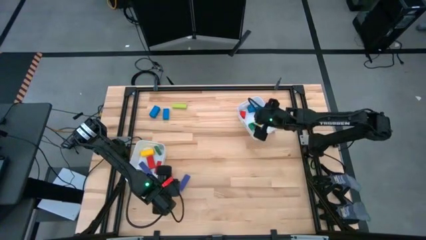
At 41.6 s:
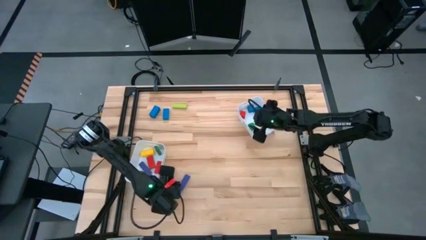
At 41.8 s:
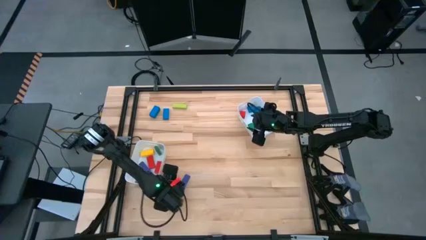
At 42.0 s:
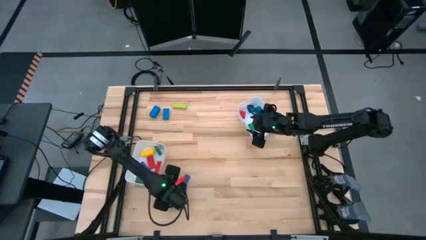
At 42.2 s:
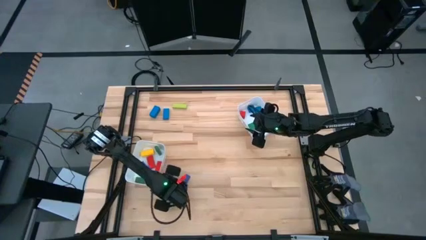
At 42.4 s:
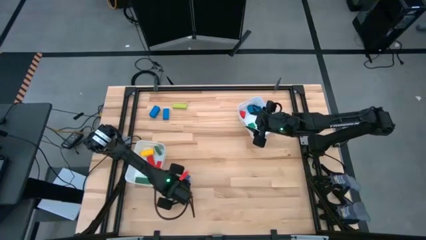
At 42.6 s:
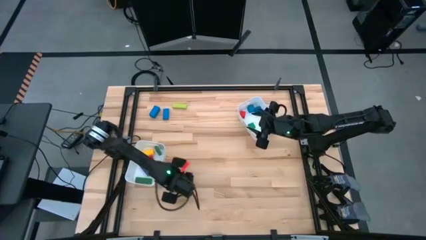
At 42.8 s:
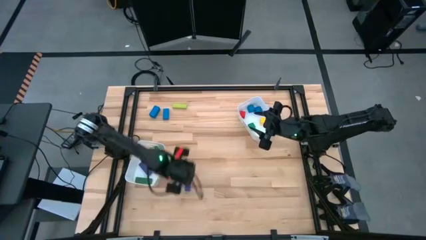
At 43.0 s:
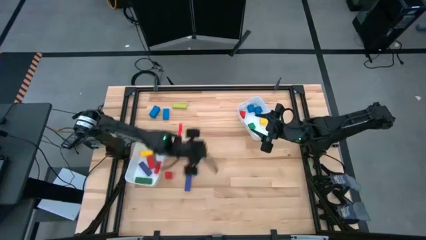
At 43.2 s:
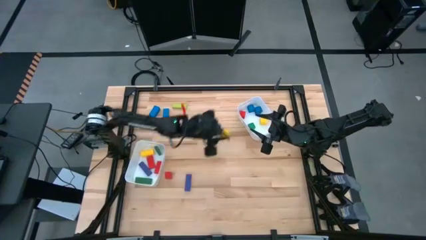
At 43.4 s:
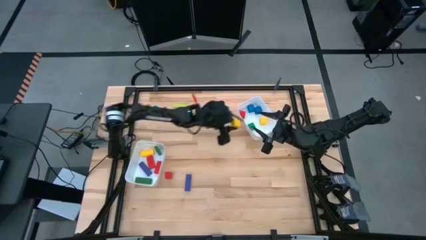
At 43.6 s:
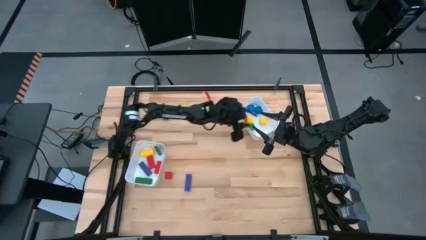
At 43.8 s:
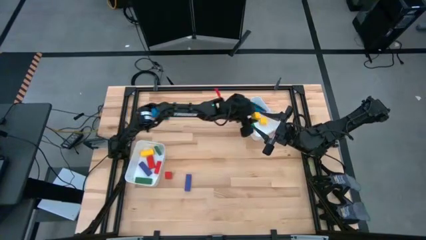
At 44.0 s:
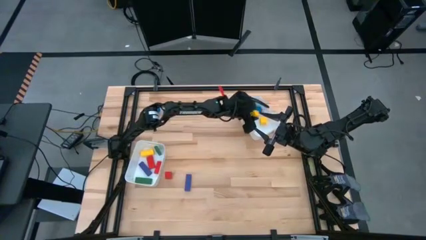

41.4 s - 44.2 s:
Task: Sort blocks by size
Put the small yellow block into the right white bin

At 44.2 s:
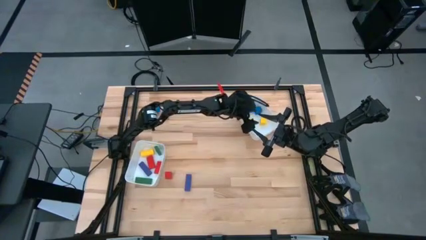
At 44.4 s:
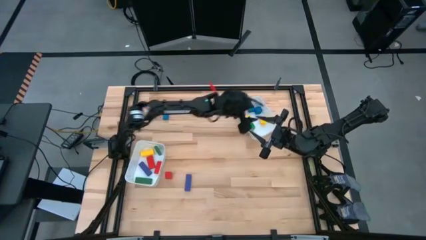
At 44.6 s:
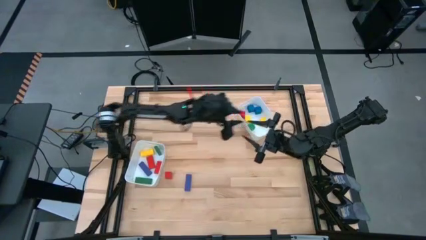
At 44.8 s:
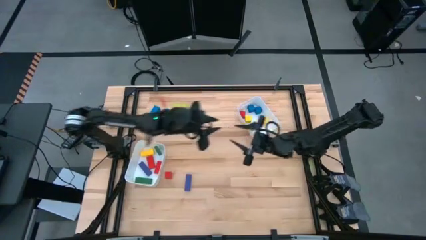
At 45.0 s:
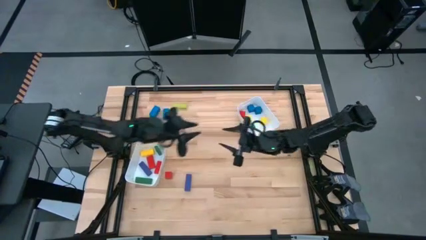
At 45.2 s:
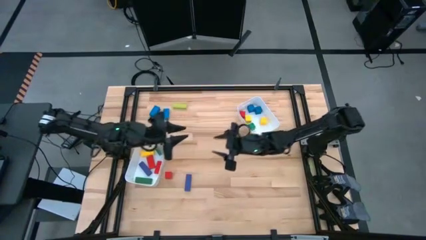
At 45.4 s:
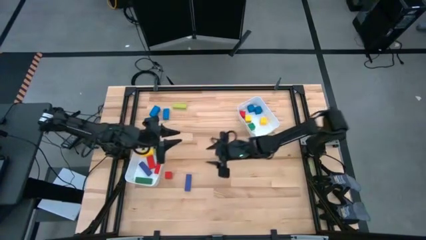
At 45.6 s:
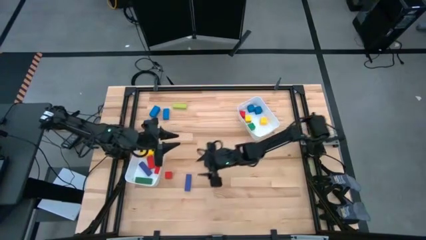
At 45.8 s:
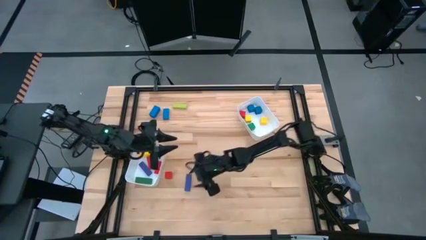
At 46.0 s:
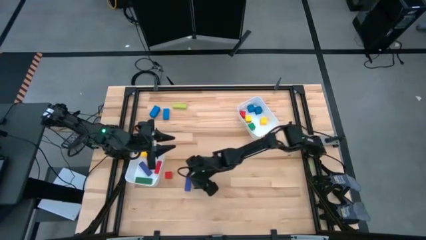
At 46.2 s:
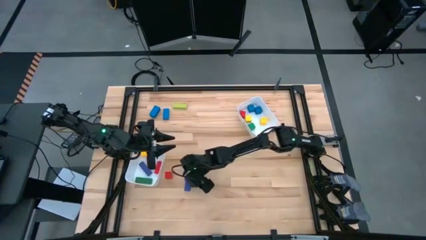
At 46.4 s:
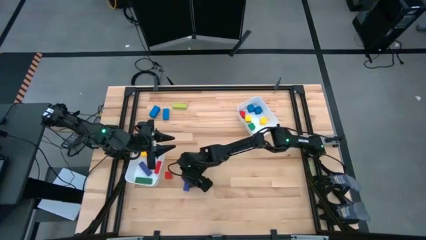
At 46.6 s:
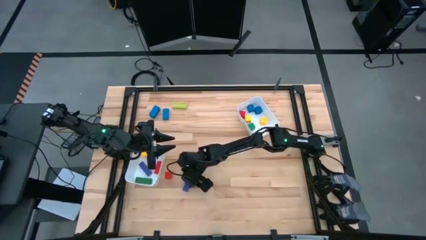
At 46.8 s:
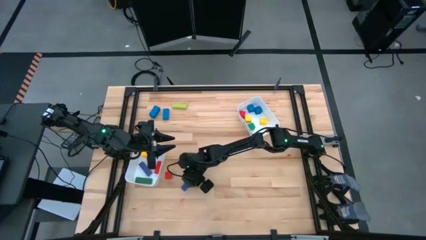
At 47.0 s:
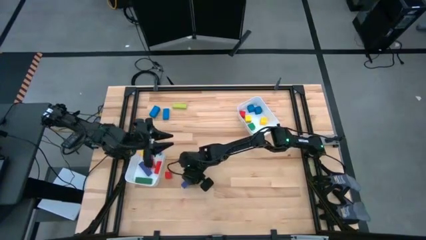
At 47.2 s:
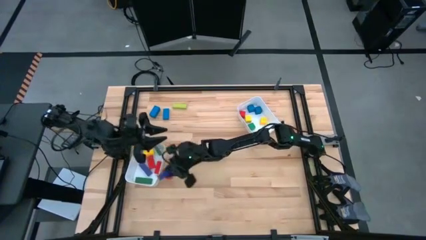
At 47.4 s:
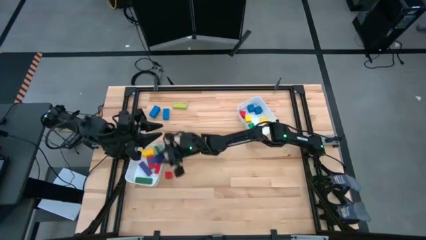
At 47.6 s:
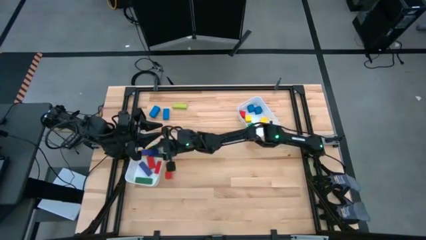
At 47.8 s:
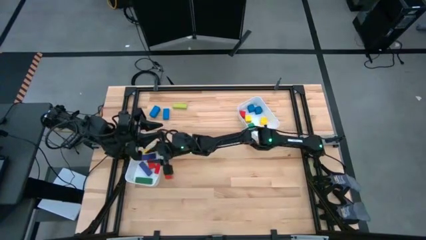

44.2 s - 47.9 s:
Put the large purple block into the left white bin

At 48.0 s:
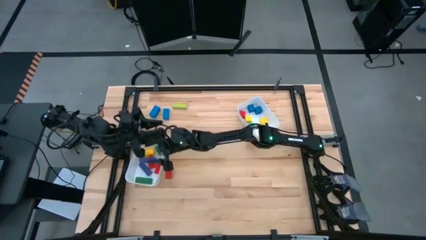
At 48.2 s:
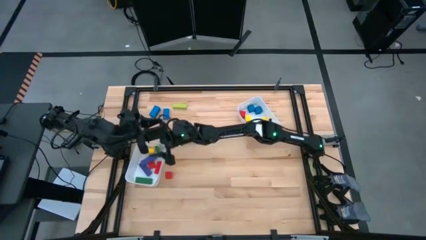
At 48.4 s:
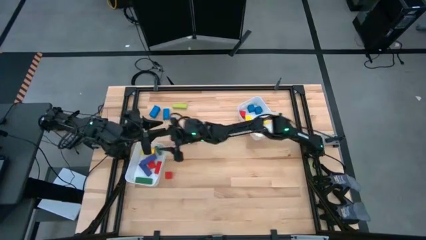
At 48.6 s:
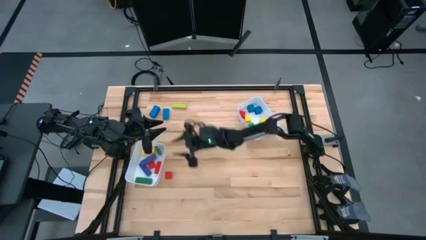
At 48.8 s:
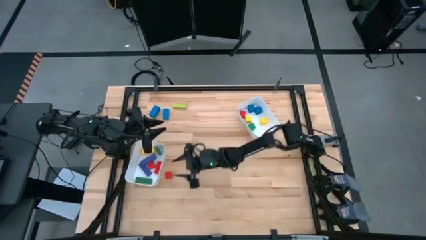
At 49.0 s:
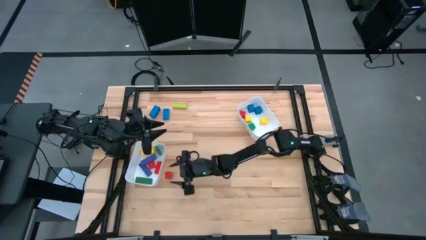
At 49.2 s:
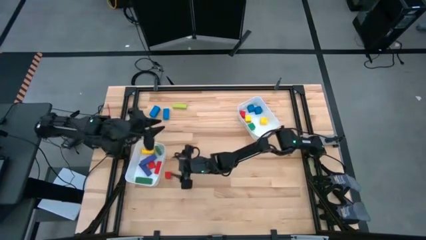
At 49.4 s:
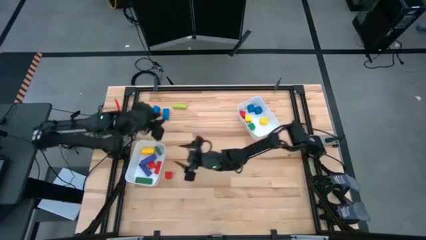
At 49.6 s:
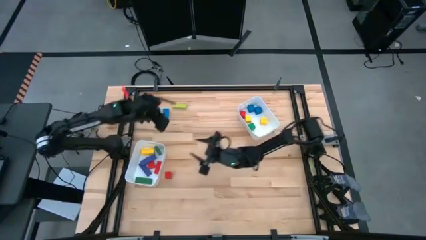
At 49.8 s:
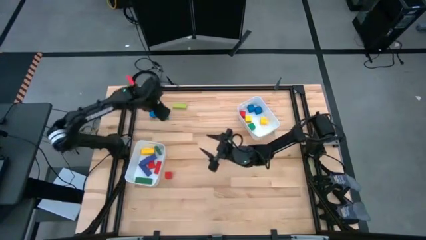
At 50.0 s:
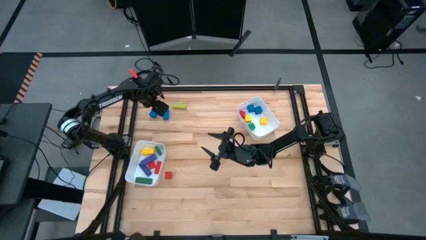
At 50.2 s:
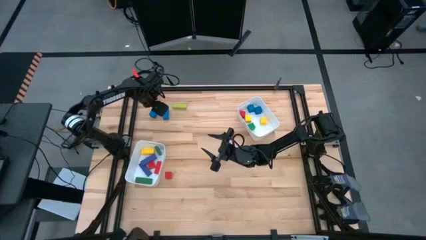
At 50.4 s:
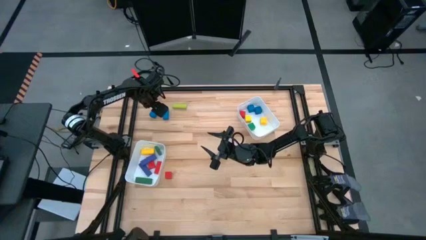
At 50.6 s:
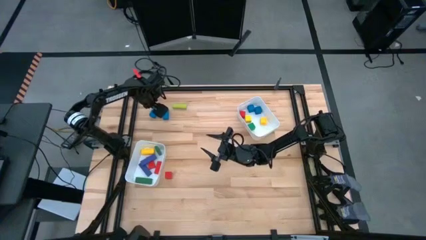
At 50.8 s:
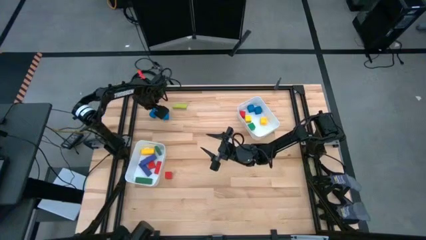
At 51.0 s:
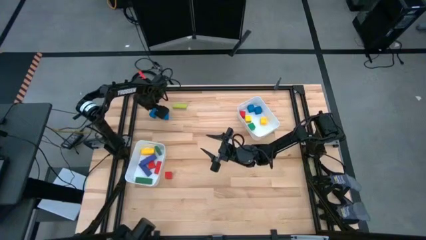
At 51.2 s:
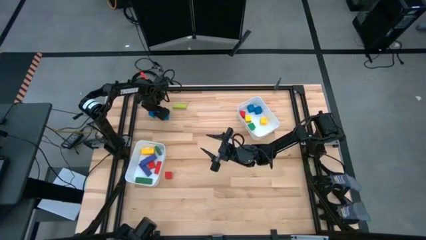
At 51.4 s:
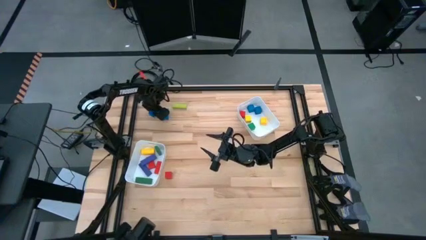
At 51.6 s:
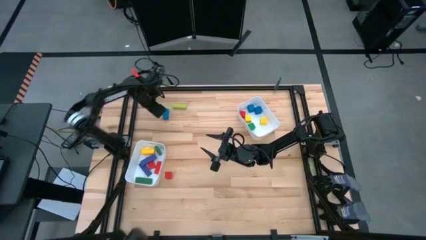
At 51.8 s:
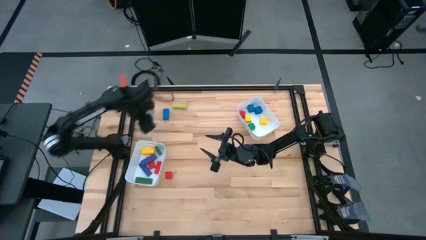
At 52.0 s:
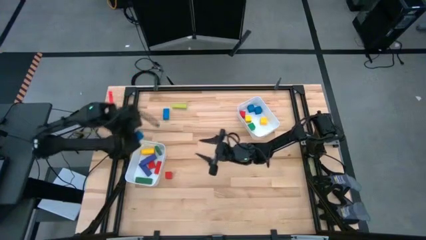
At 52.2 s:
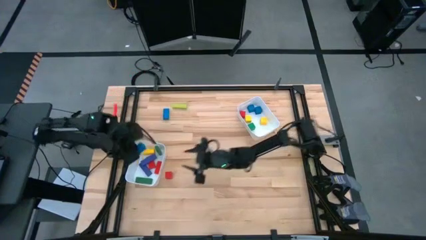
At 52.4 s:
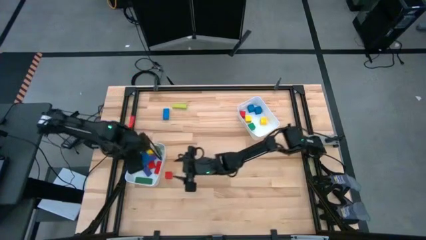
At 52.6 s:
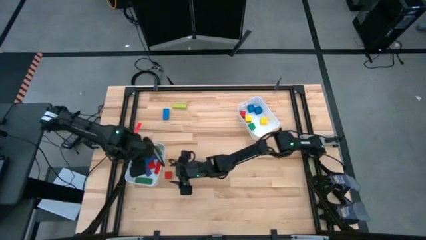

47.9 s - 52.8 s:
Put the large blue block into the left white bin

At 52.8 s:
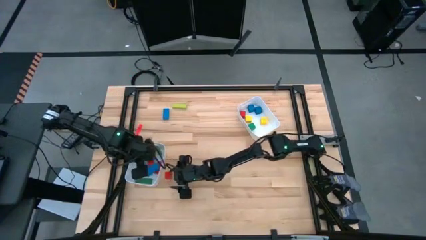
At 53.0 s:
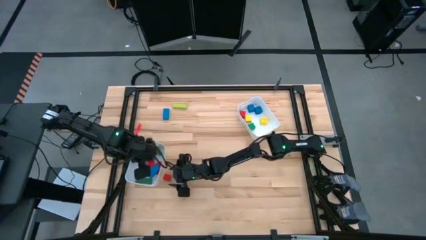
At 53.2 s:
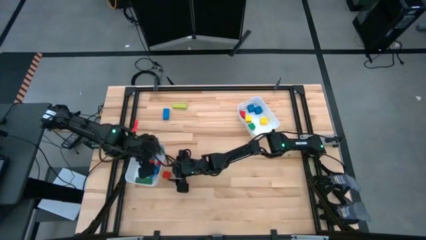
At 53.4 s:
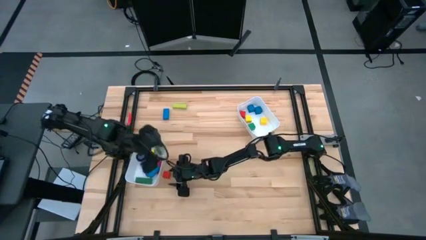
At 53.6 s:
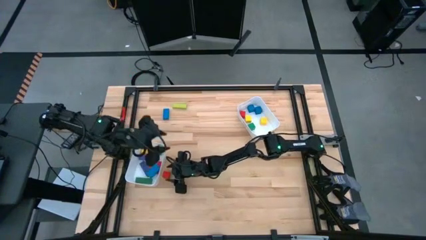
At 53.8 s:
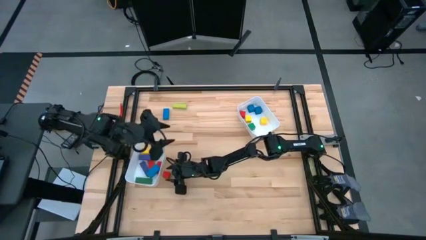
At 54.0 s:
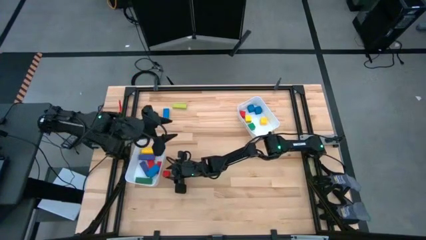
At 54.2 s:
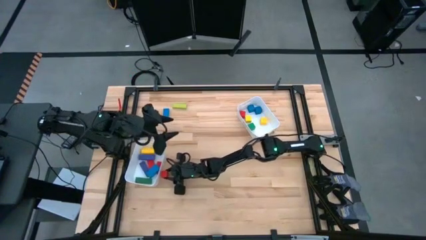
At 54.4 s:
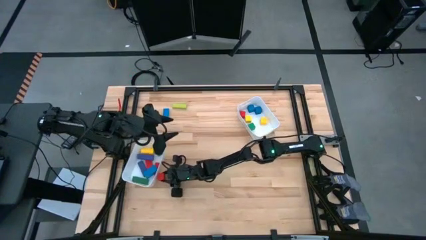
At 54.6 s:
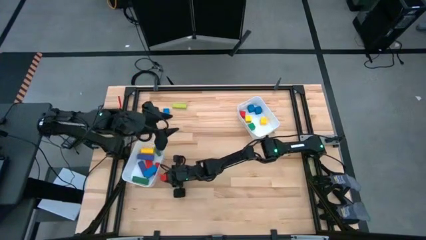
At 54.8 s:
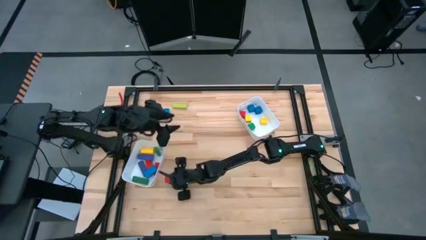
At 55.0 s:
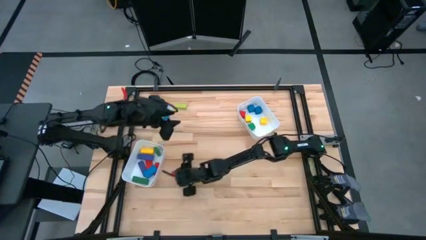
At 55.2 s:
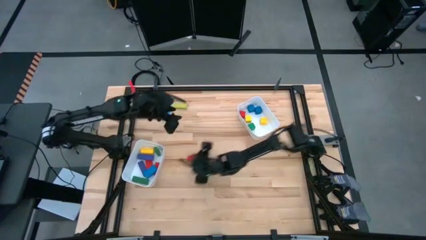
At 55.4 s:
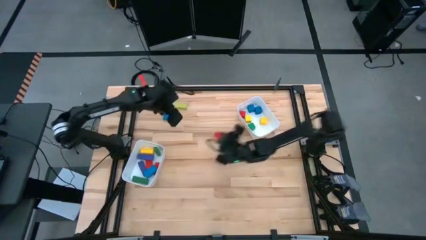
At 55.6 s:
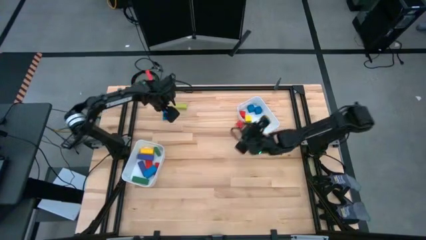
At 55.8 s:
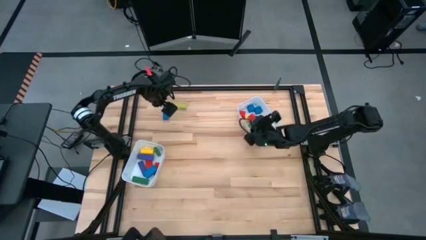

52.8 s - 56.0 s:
Put the small red block into the right white bin

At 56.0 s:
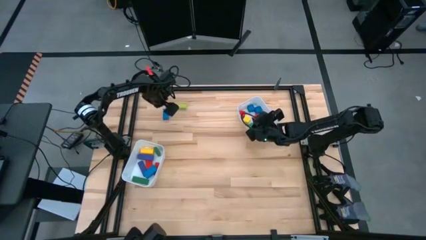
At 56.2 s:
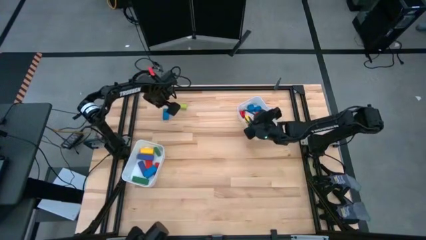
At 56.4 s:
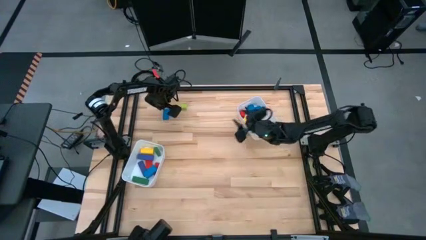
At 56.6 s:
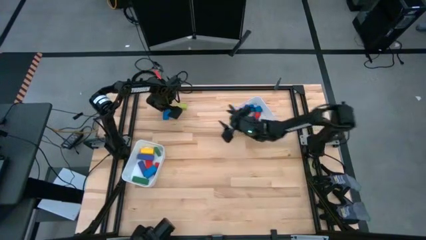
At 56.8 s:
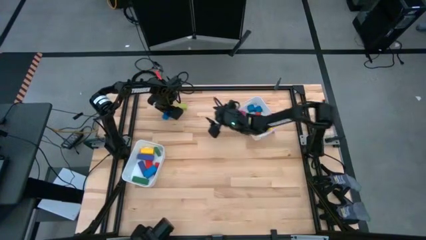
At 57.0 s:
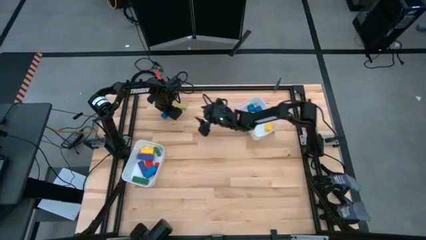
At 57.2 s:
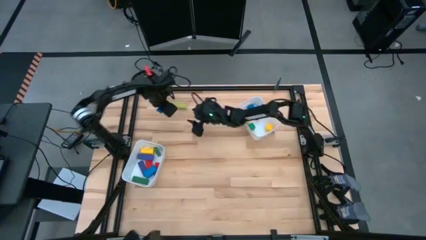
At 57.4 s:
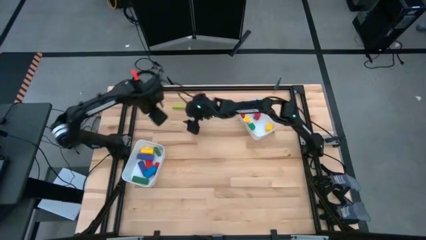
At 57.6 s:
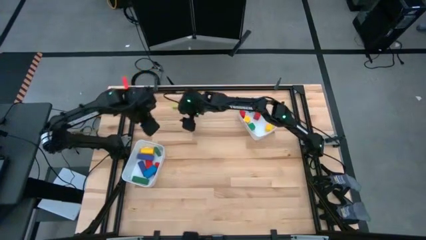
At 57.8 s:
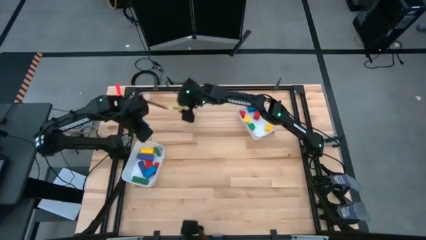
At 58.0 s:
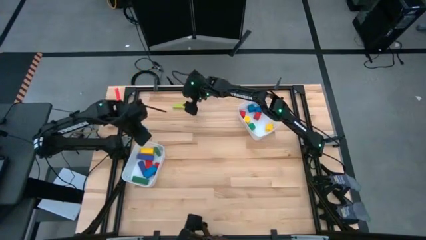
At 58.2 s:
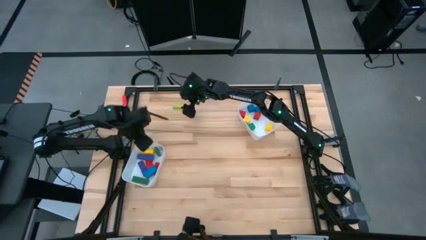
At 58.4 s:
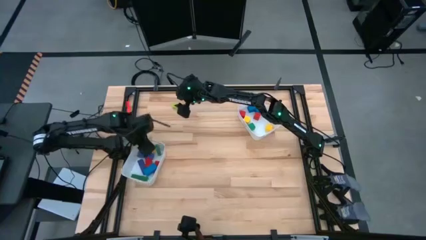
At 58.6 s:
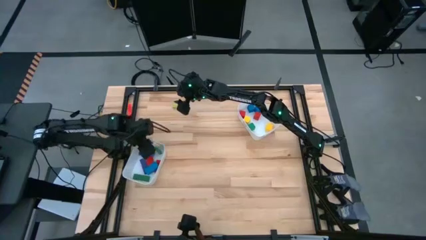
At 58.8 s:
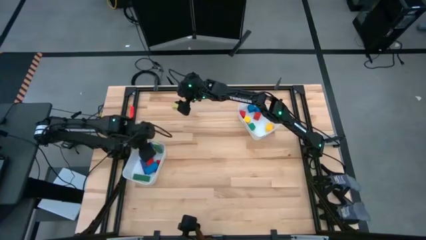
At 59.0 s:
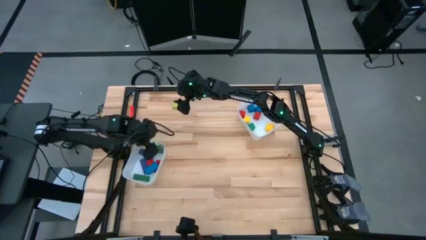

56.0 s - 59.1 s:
Put the large blue block into the left white bin
